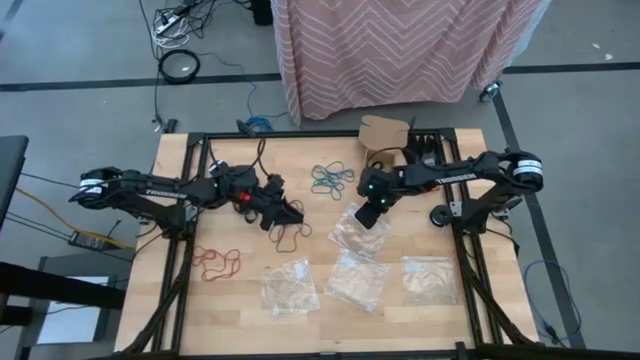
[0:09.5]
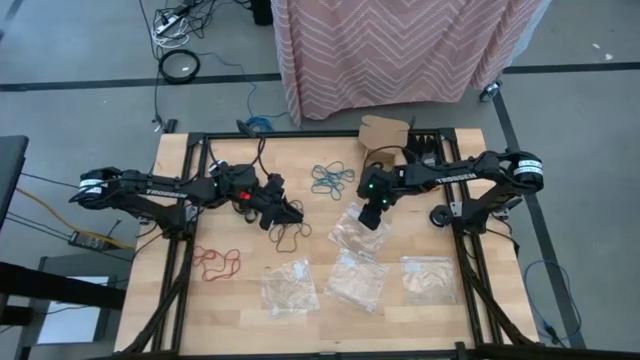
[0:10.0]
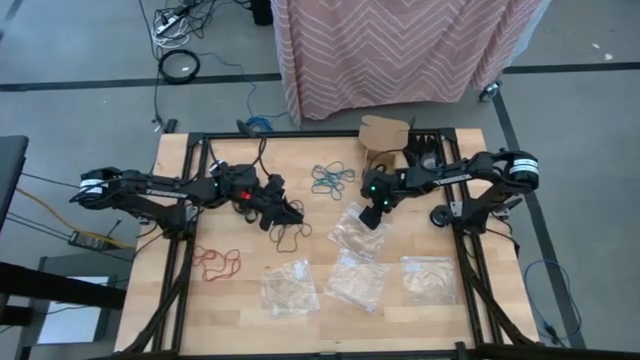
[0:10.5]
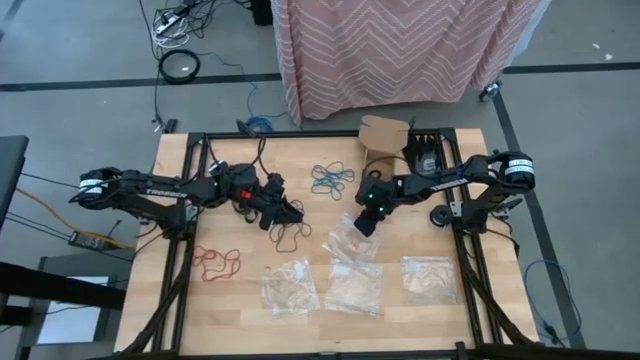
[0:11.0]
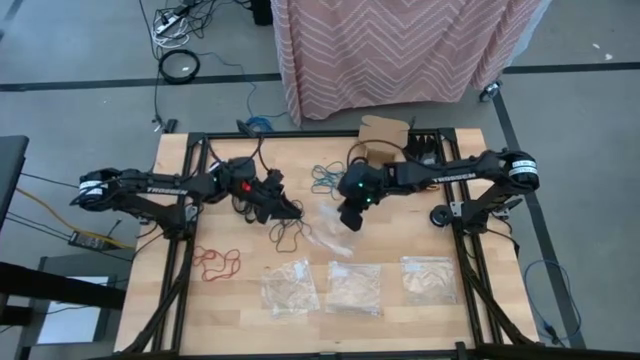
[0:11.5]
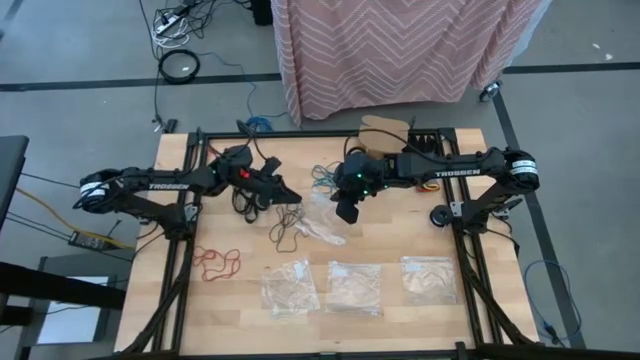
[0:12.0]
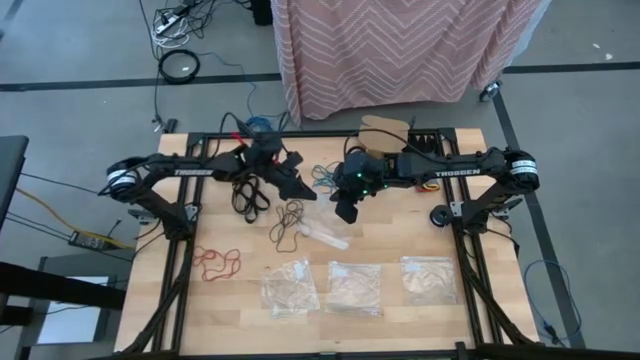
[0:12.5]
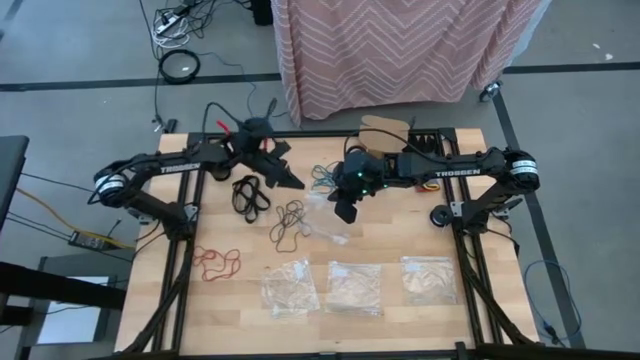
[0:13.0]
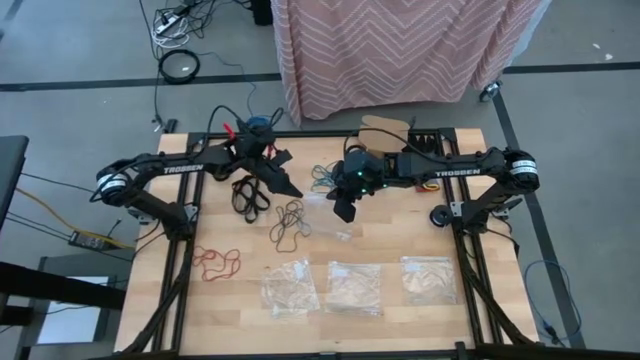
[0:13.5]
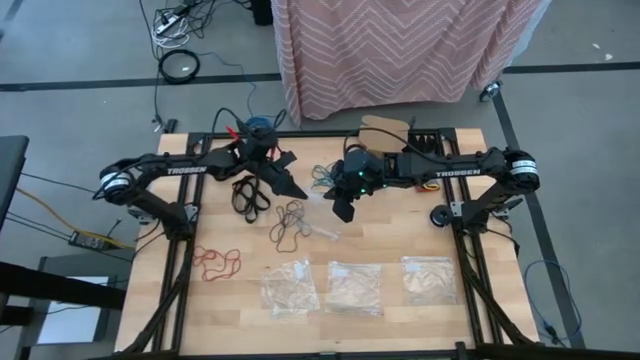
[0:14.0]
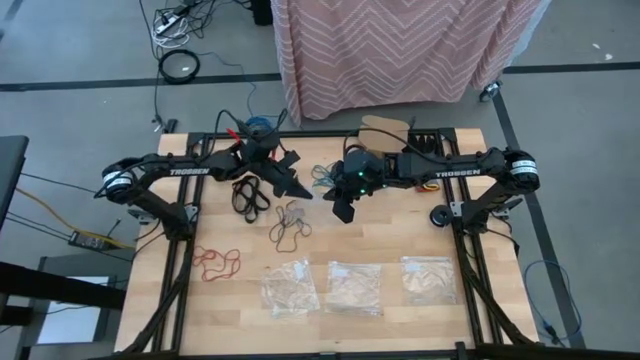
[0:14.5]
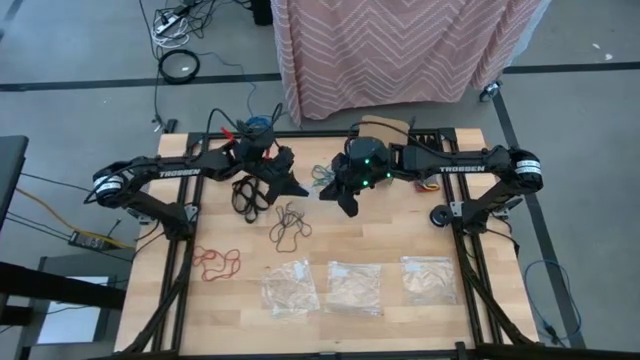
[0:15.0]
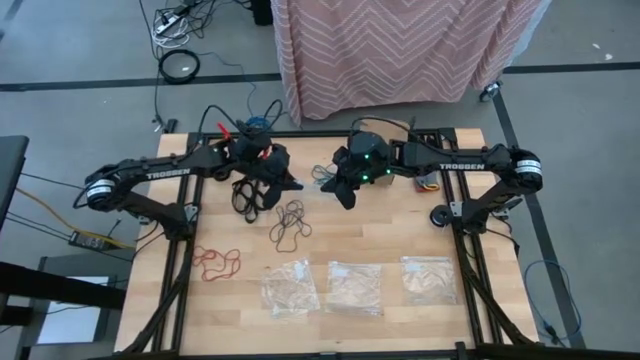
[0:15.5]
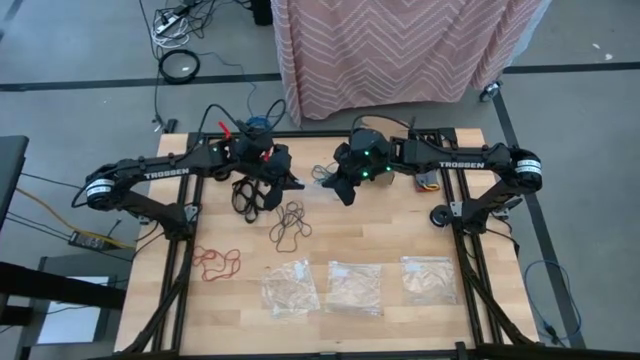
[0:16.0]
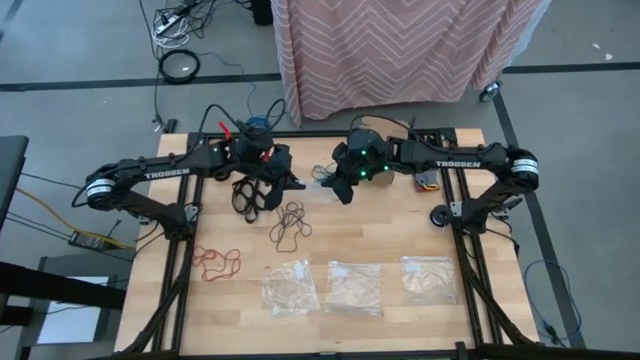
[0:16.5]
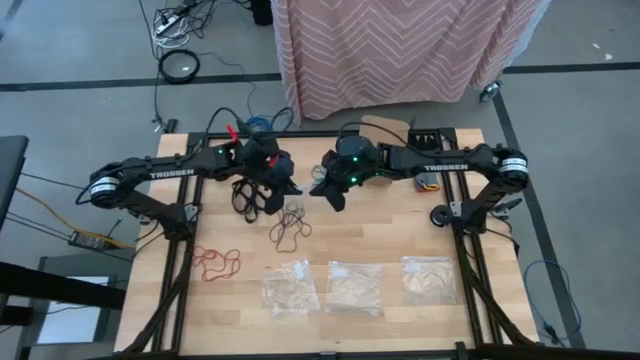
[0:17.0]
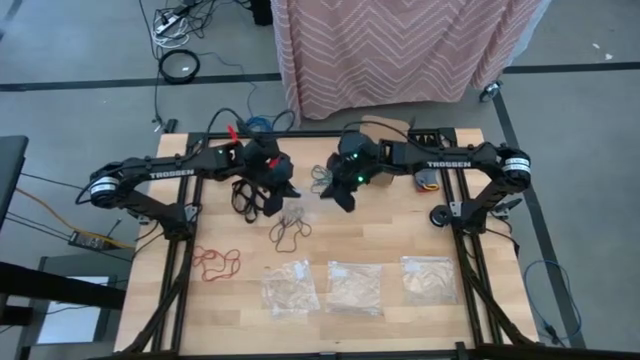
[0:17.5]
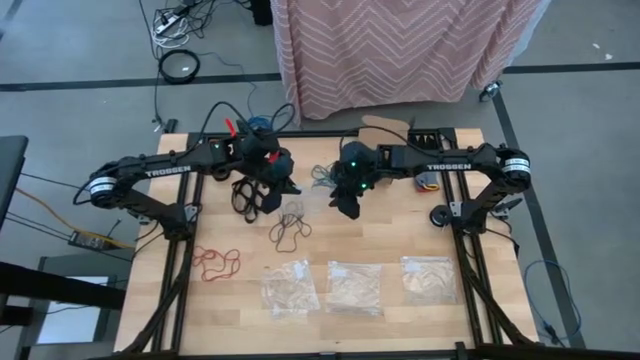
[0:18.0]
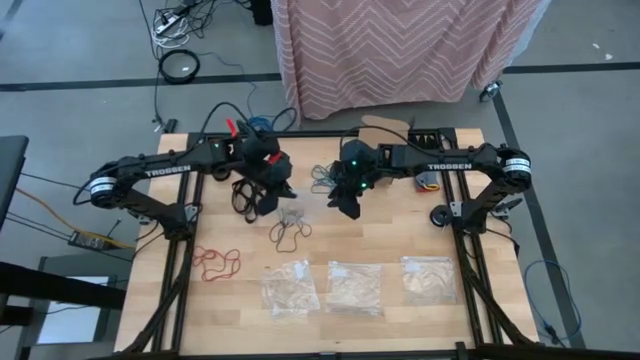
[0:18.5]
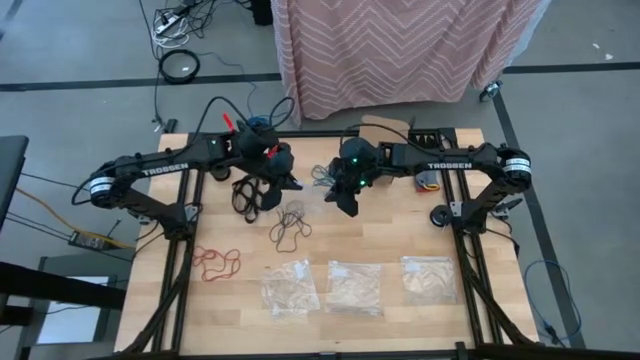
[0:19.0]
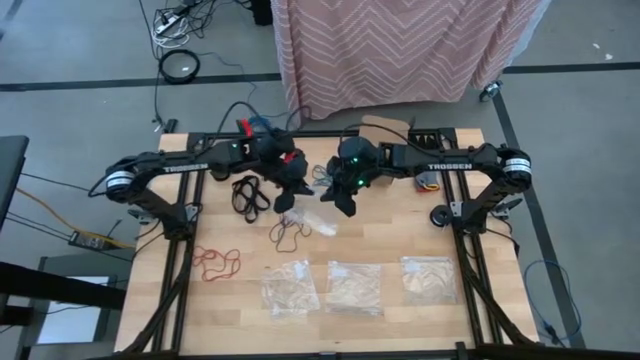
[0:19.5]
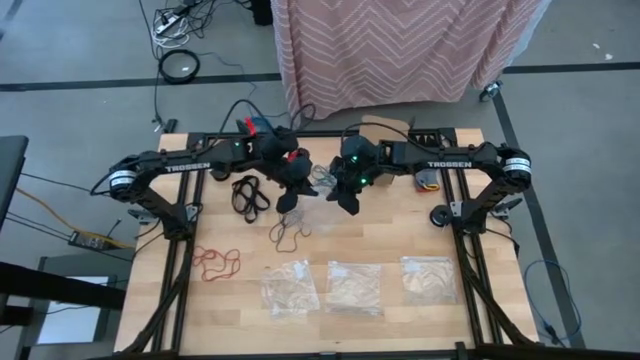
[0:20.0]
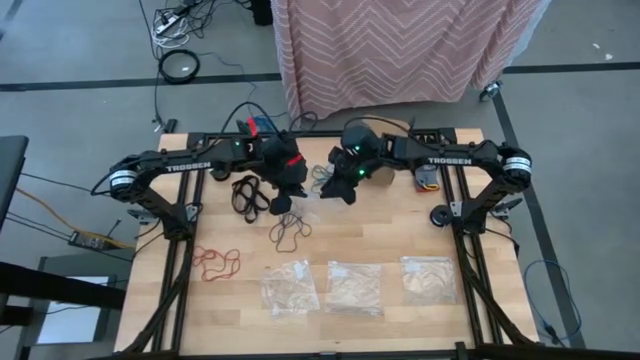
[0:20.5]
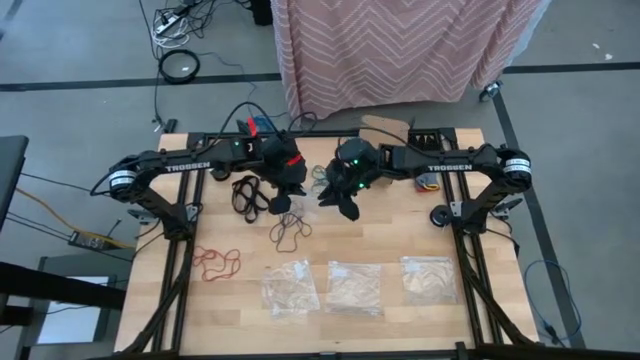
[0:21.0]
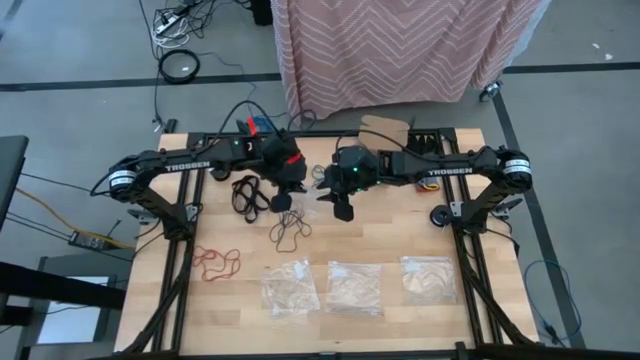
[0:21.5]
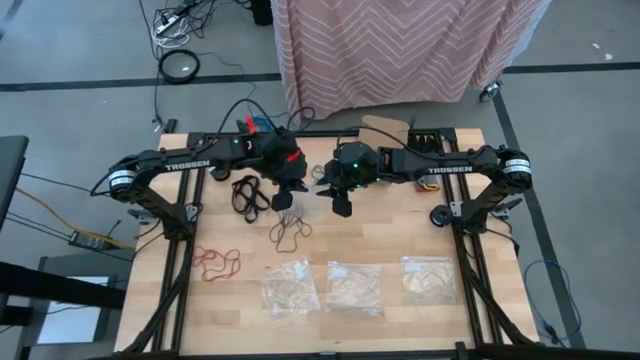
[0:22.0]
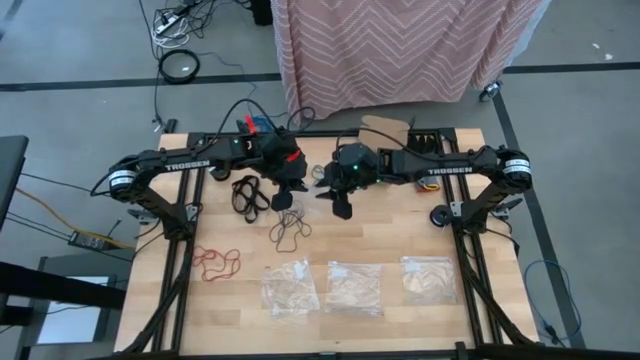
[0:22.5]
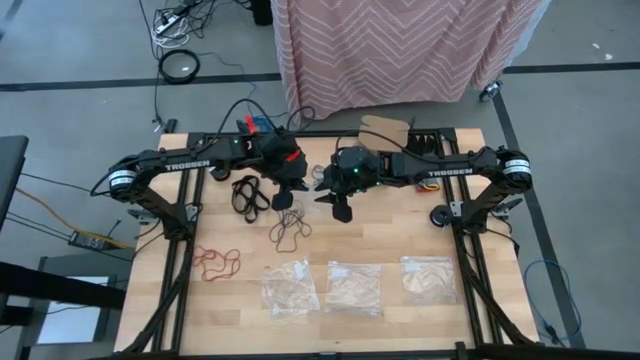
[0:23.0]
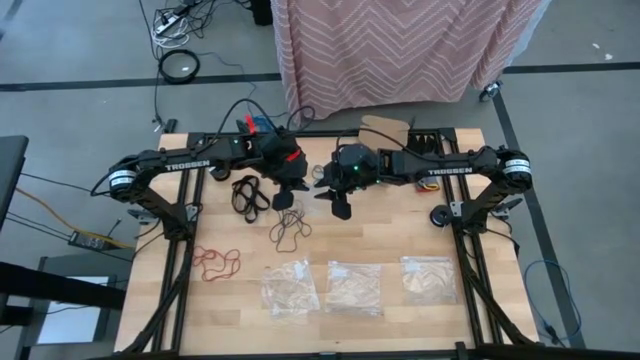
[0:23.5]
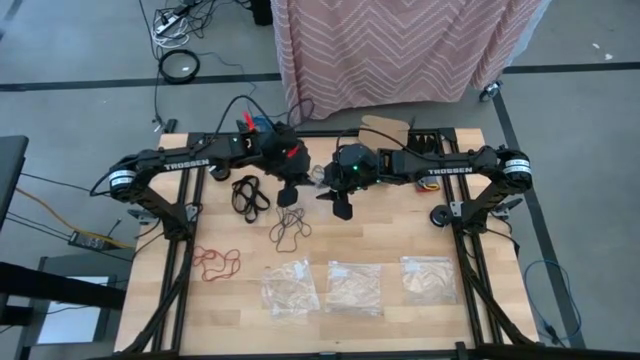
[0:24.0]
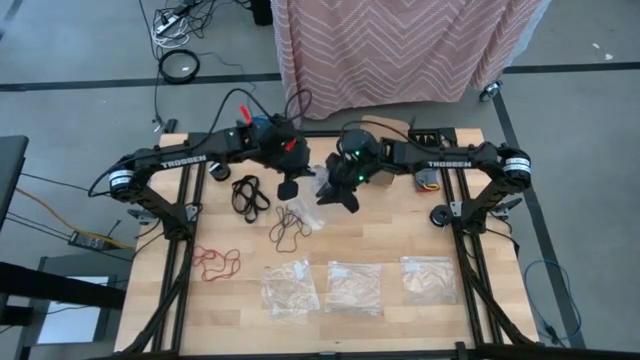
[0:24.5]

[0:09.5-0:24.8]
Task: Sort rubber bands
Open the top transparent zip bag

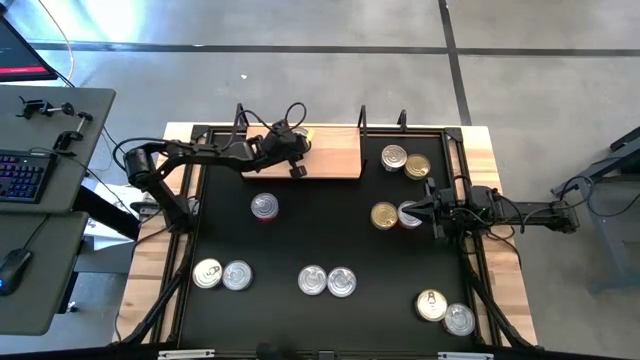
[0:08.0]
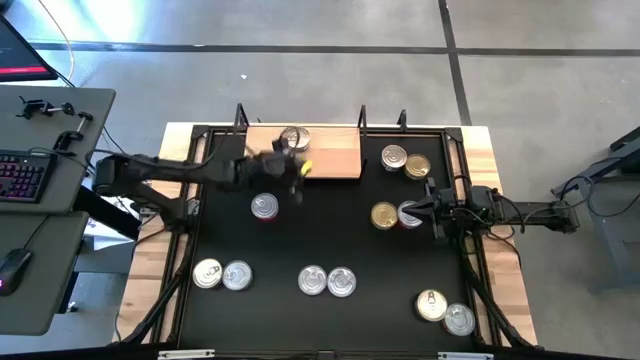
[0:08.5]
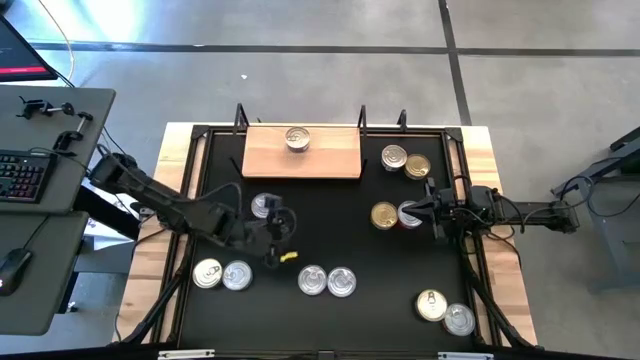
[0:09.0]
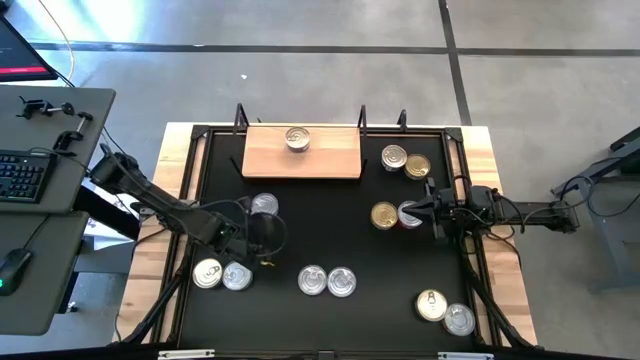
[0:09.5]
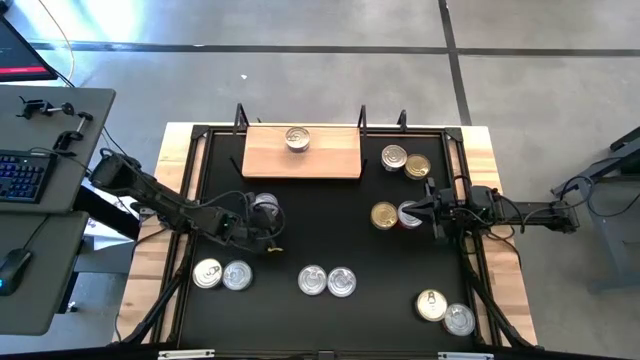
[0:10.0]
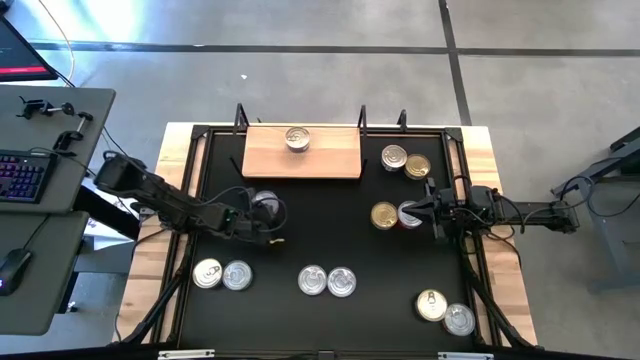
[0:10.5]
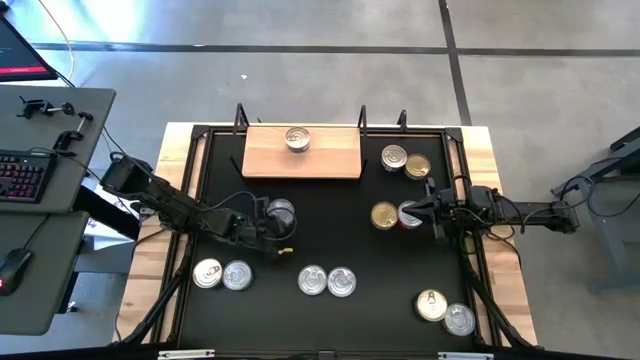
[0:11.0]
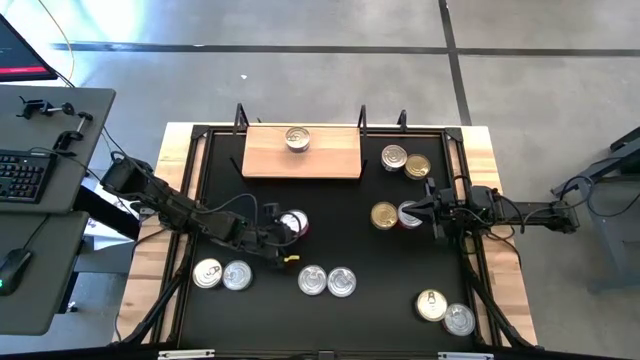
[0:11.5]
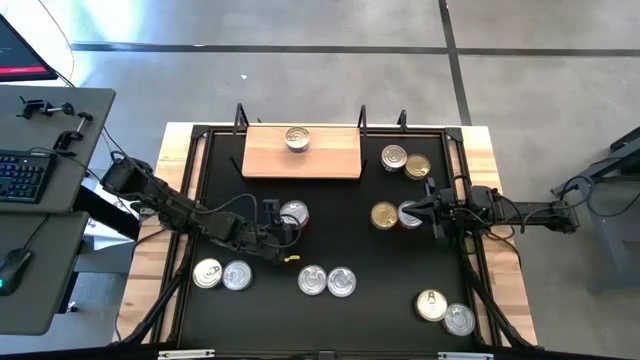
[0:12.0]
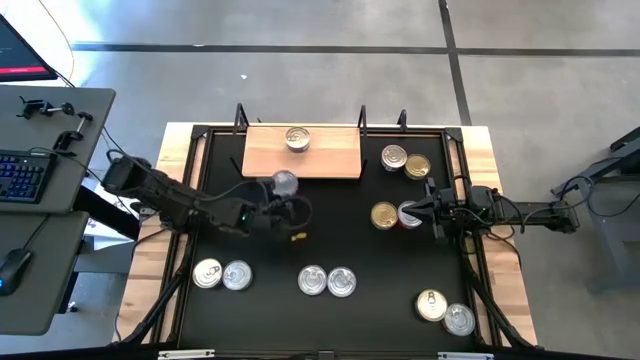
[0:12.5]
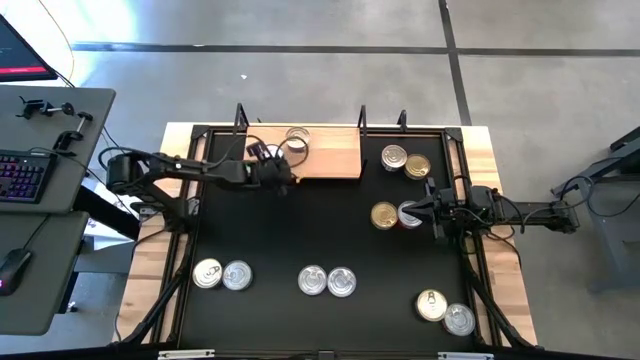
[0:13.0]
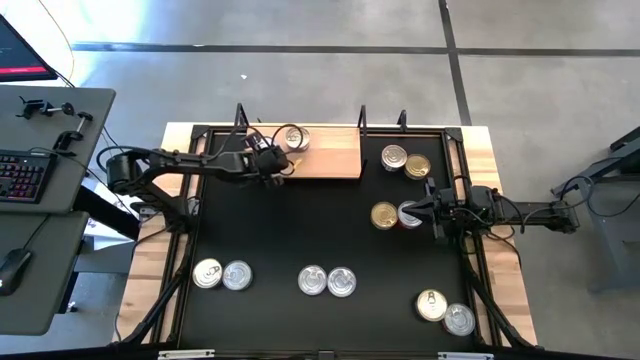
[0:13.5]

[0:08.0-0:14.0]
Task: Stack canned seafood by type on shelf
Put the red tuna can on the shelf
